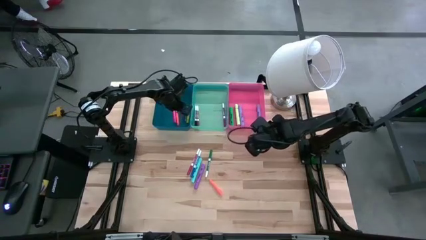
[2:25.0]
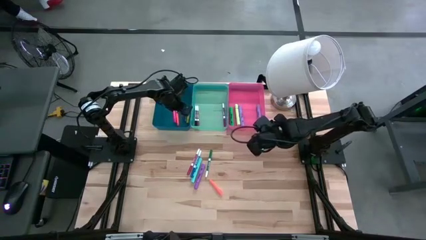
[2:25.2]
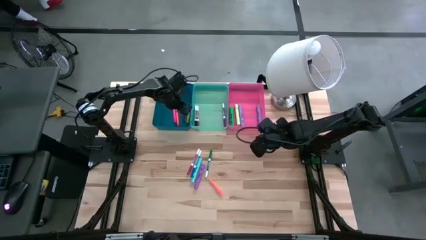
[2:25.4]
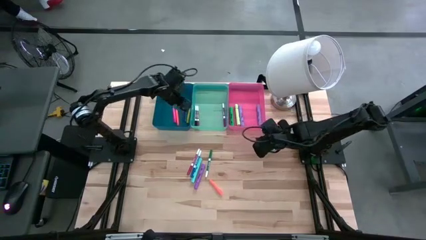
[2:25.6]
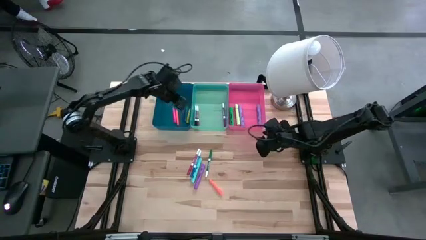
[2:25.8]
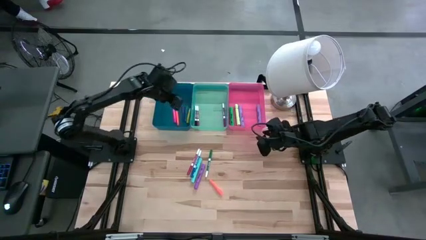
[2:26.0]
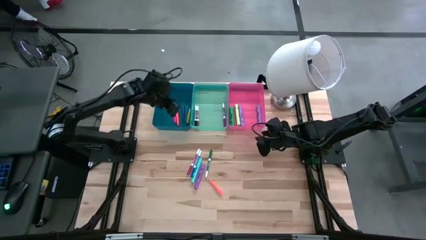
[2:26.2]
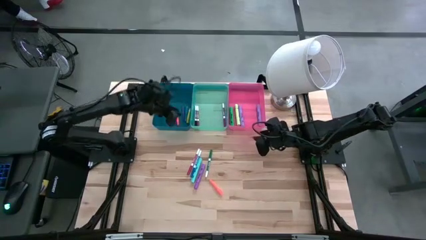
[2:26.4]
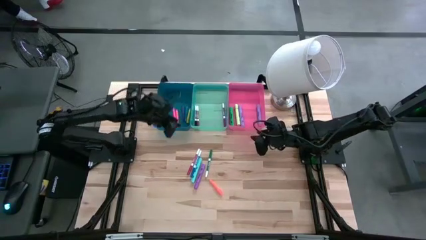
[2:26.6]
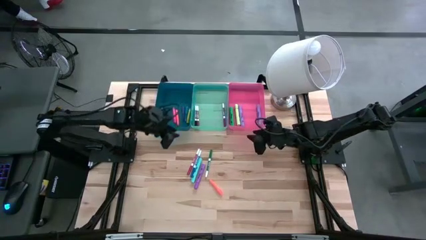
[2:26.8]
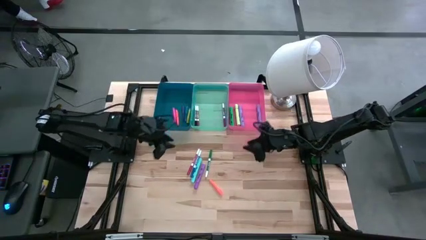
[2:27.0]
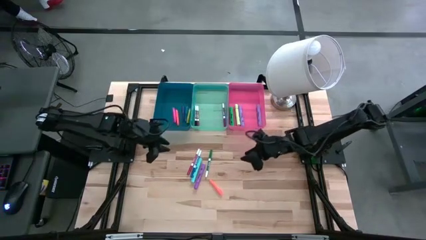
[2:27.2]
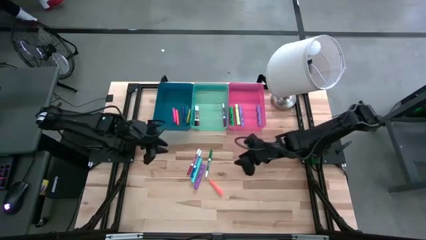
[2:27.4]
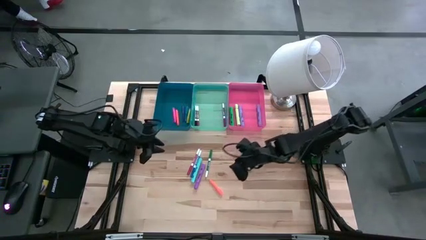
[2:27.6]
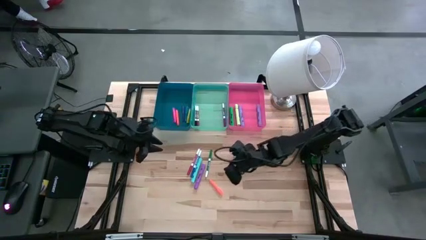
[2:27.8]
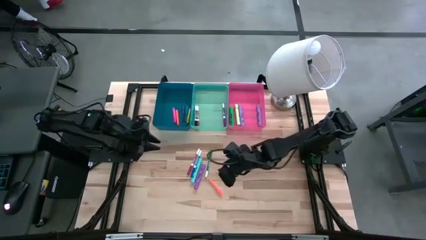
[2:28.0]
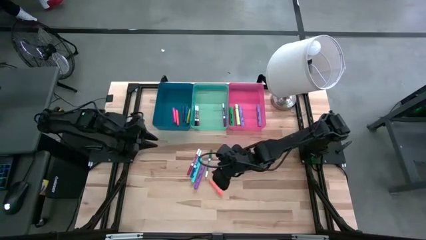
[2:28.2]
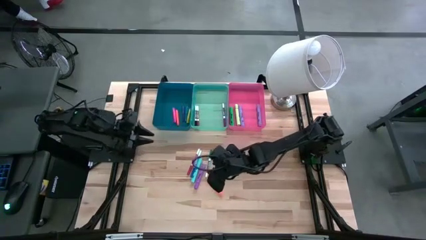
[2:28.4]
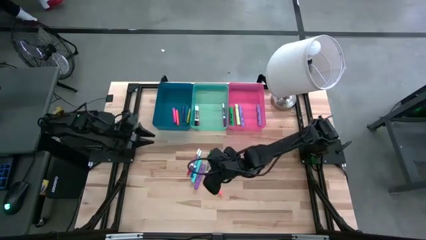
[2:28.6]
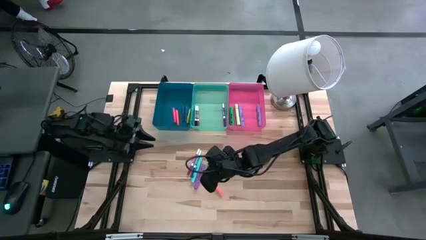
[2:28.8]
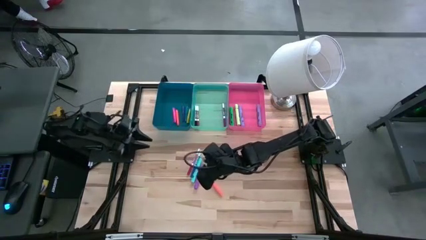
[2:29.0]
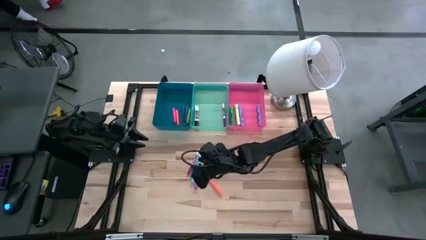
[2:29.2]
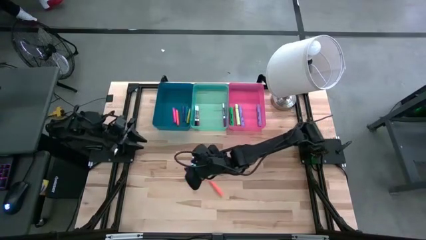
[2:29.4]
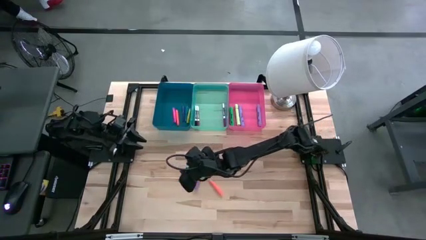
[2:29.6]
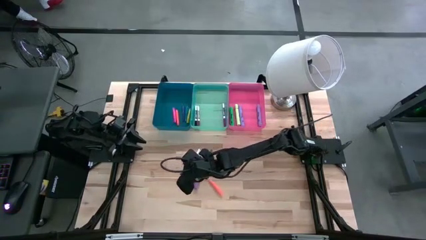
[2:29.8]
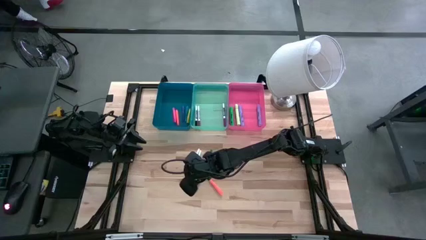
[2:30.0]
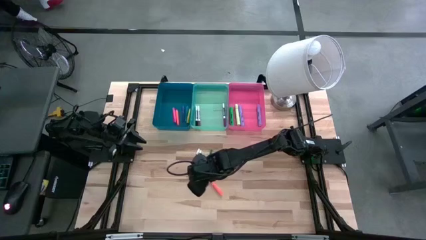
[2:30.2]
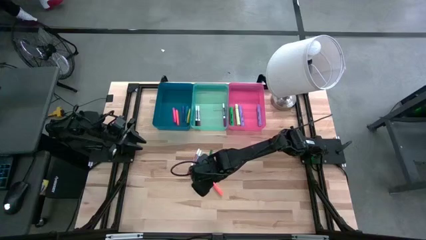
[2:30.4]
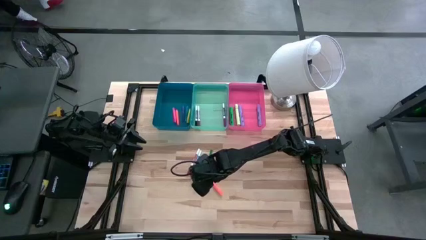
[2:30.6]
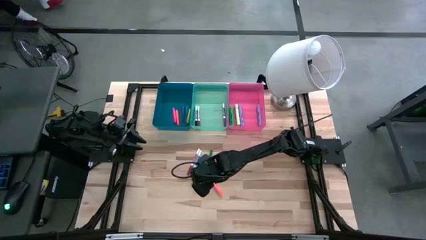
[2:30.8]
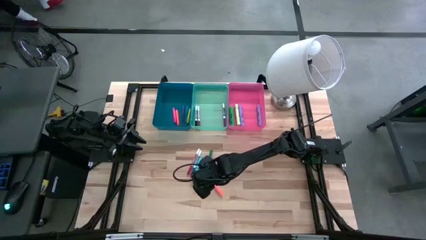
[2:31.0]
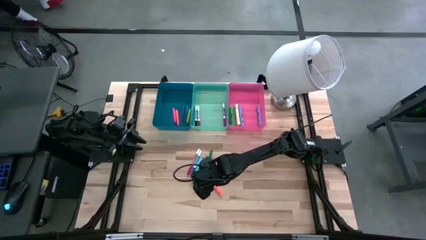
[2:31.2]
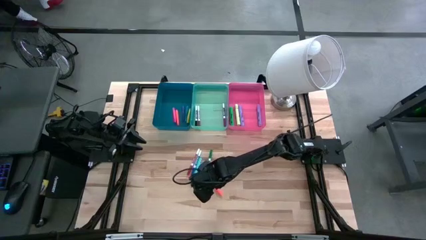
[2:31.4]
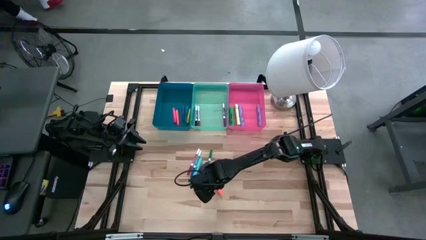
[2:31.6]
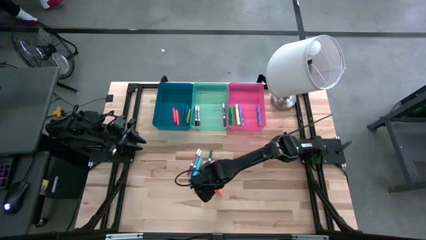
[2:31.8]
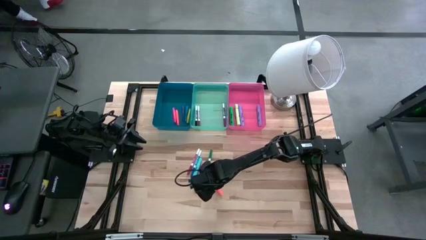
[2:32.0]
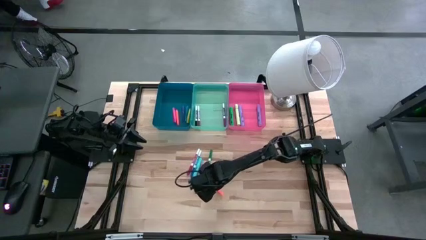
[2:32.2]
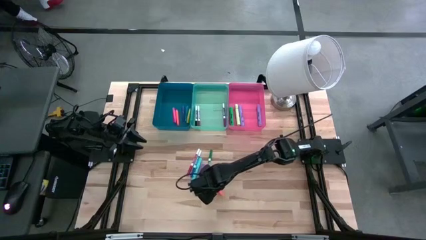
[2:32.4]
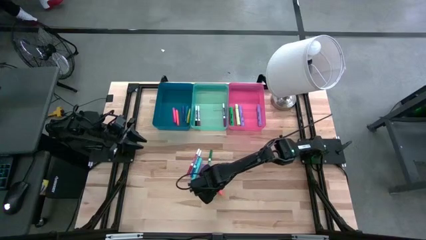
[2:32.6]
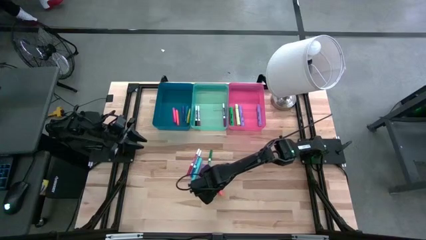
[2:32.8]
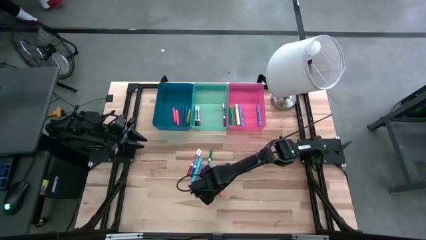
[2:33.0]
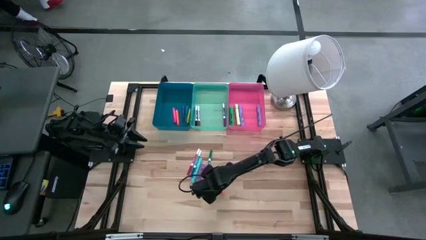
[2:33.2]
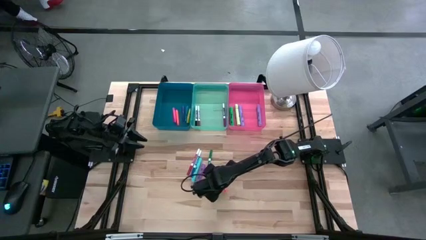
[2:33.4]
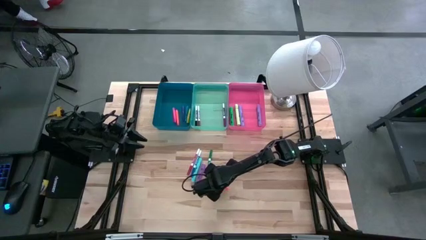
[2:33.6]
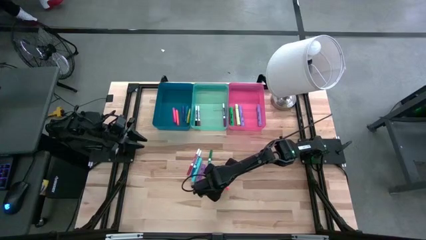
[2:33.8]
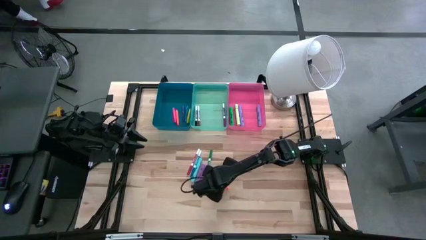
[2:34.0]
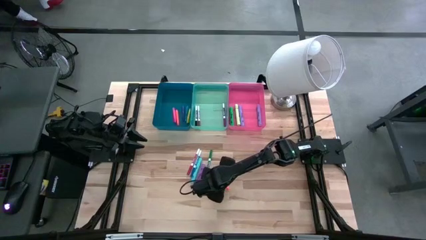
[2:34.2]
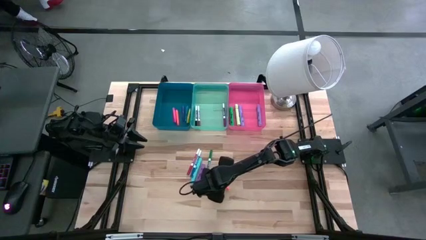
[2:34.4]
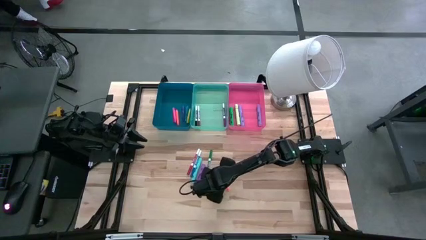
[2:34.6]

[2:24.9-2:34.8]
Task: Pick & Place Markers
Put the orange pen into the blue bin

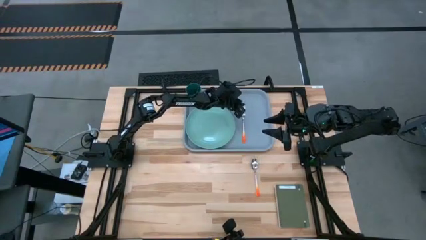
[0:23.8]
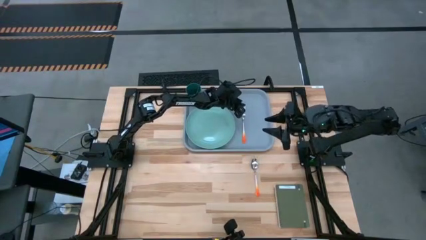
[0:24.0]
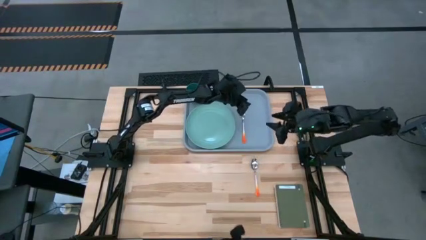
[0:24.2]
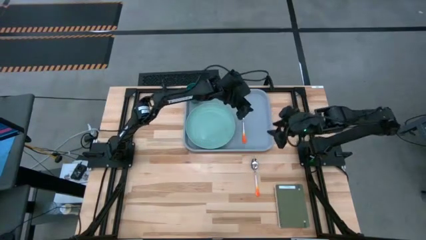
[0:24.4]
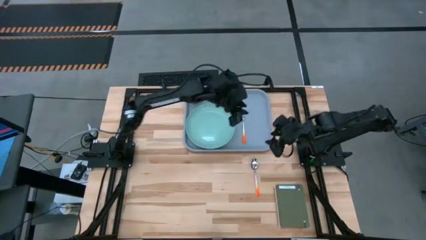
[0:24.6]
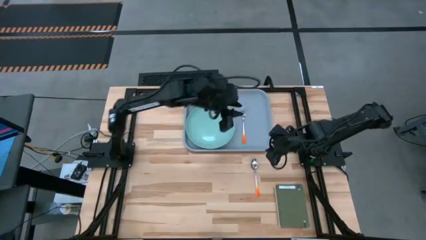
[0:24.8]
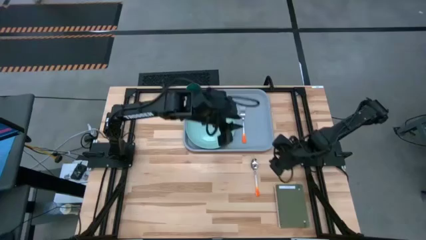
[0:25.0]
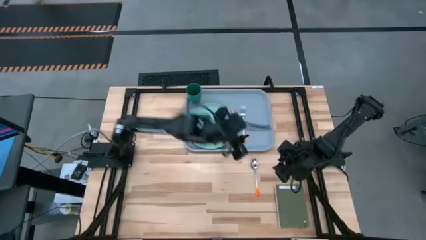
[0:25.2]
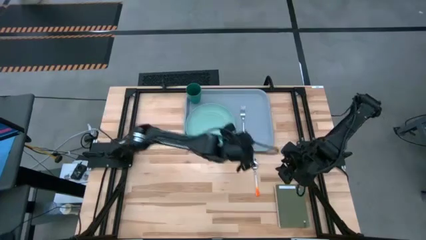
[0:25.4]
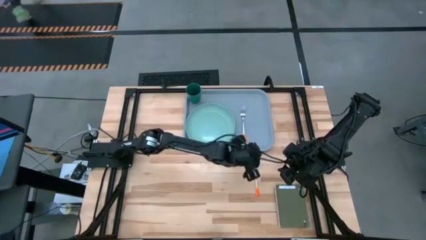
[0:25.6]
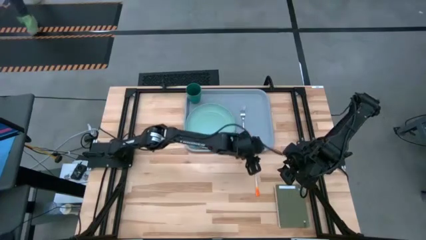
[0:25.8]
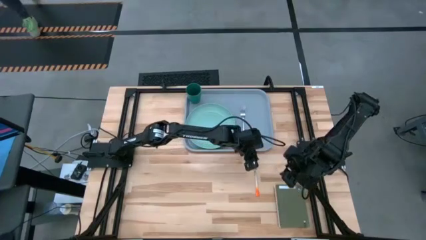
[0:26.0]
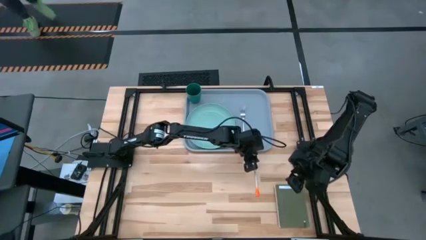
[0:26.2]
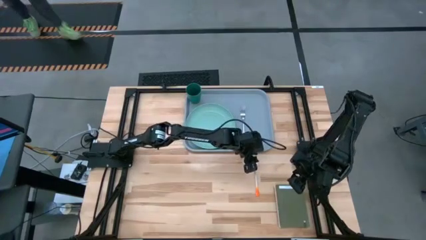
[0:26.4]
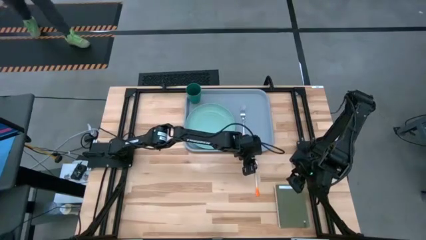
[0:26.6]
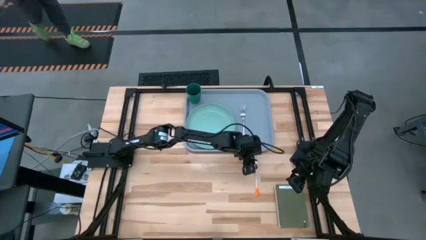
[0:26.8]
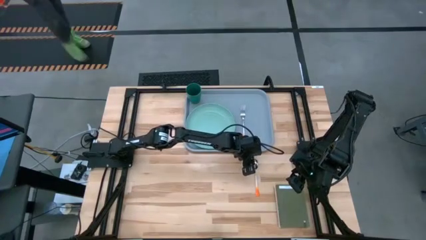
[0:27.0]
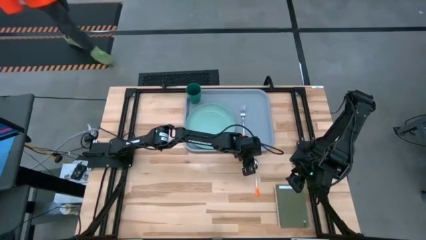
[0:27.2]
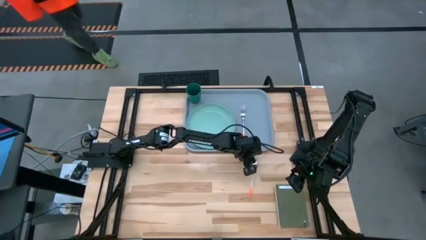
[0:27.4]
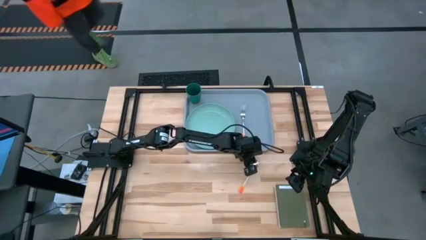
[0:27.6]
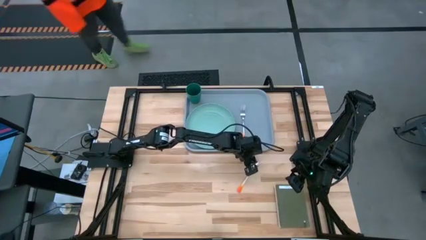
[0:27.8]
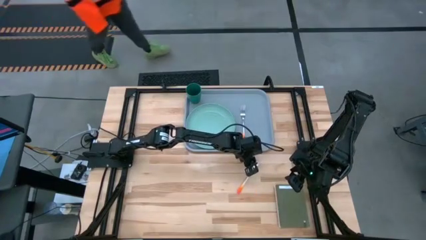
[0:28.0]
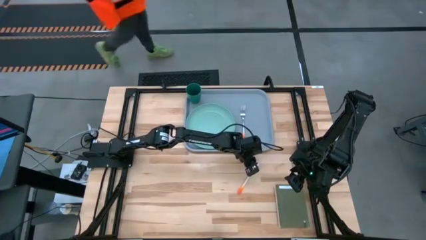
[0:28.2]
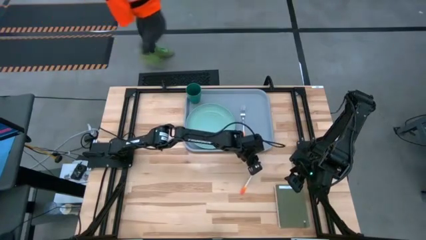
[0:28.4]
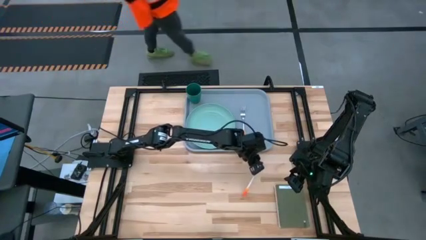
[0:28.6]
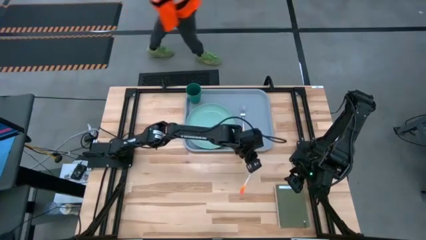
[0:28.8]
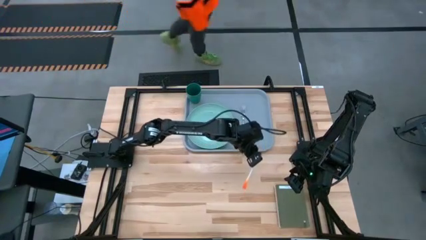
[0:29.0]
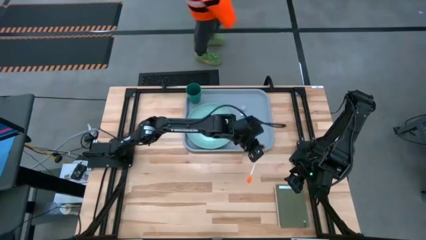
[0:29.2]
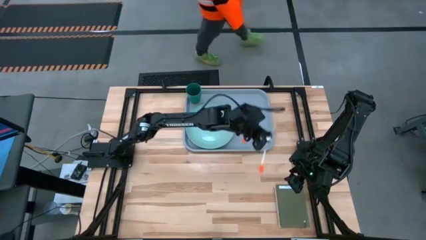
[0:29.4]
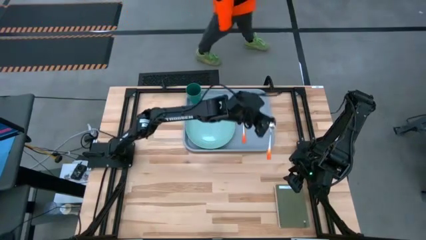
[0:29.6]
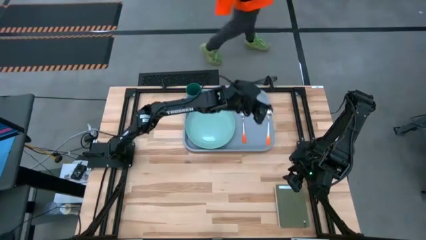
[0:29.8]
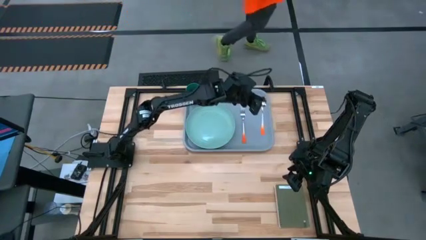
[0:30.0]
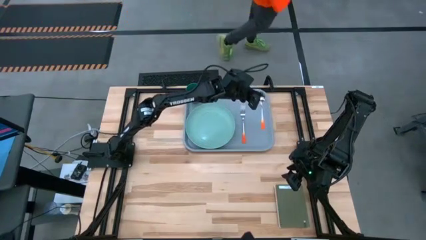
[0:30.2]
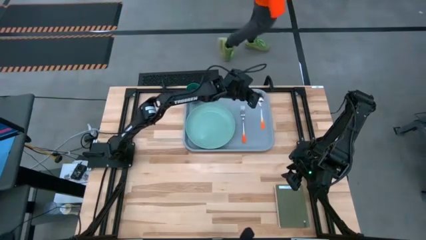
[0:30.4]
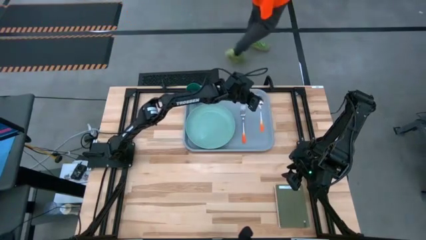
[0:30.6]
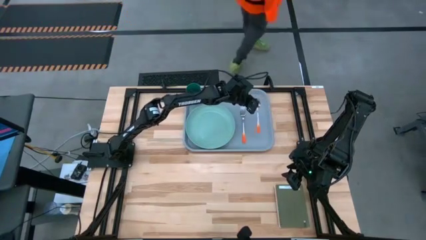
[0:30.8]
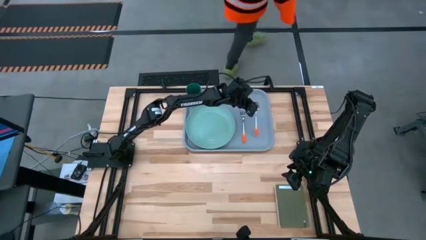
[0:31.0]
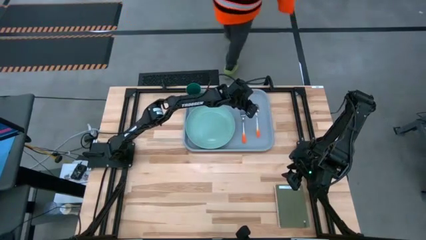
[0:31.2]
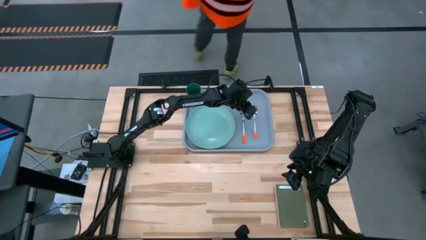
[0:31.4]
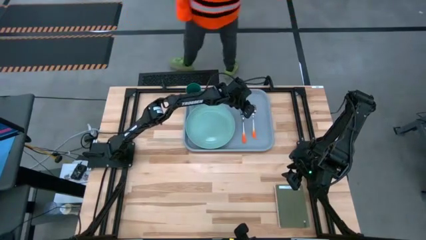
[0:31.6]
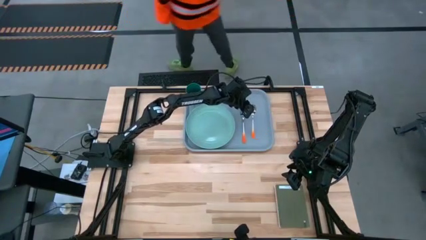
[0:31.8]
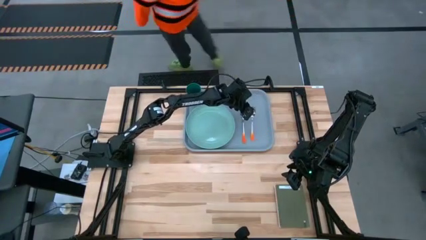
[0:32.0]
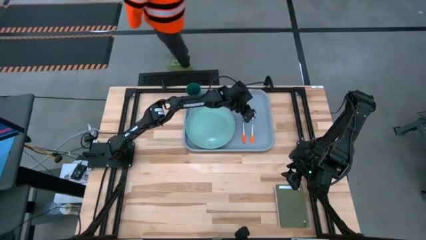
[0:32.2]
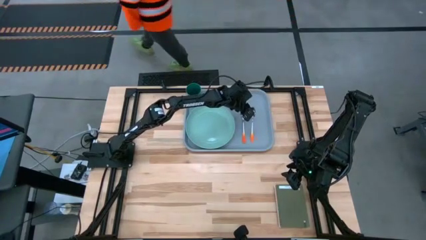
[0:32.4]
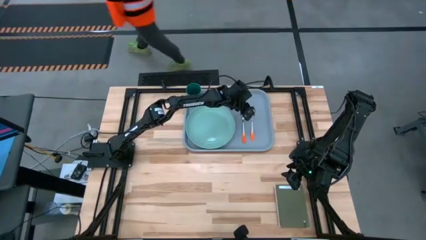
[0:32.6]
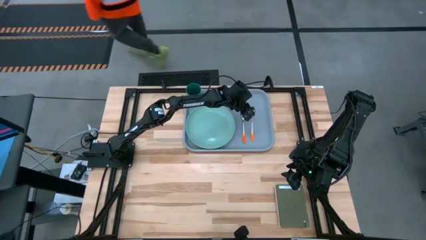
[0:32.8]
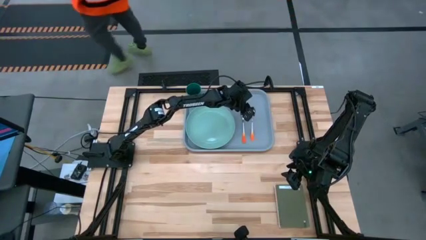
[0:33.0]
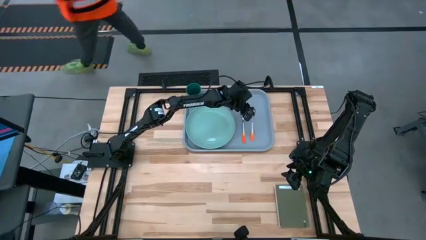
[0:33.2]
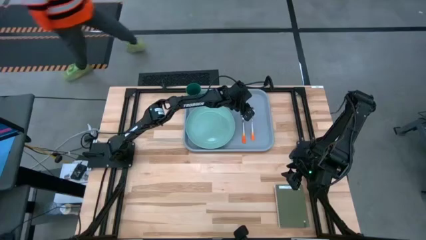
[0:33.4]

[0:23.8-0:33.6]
Task: Pick and place plate/cup/fork/spoon on tray
Put the orange spoon on the gray tray to the right of the orange fork
